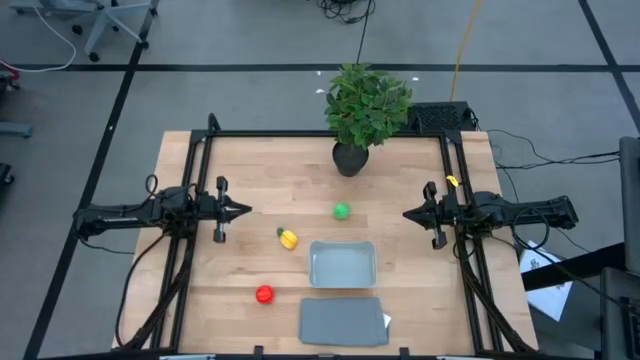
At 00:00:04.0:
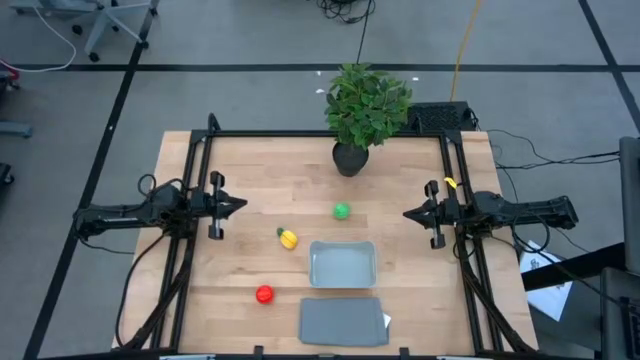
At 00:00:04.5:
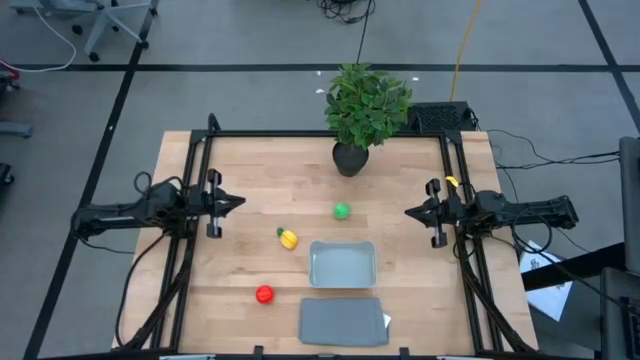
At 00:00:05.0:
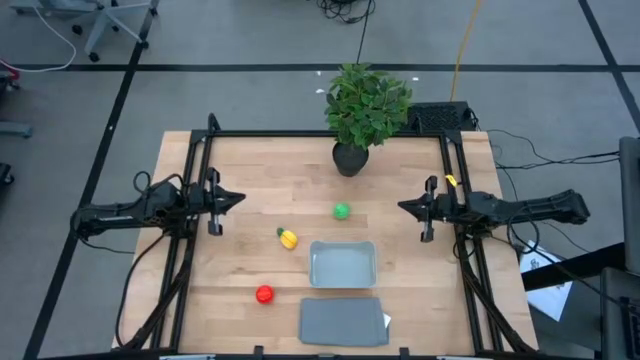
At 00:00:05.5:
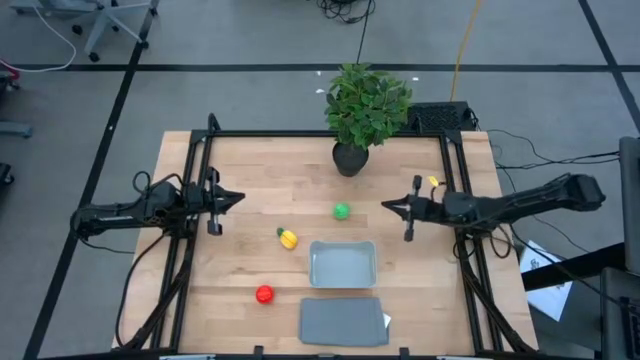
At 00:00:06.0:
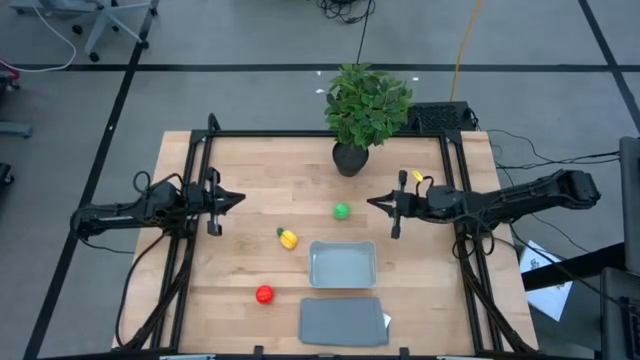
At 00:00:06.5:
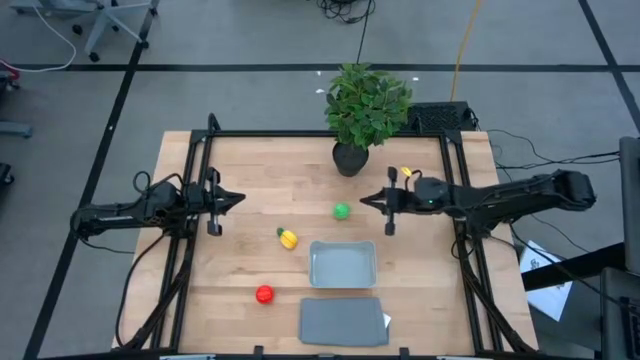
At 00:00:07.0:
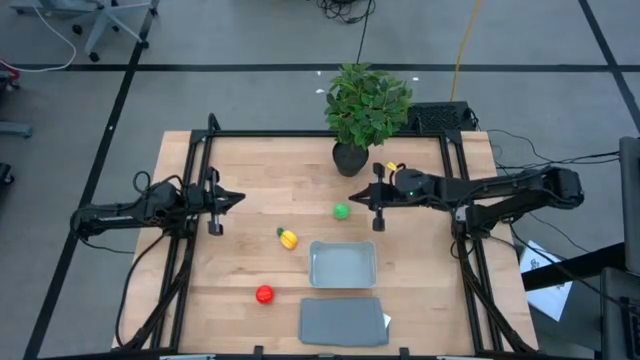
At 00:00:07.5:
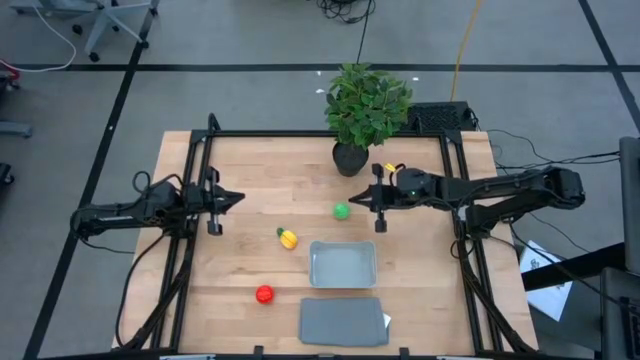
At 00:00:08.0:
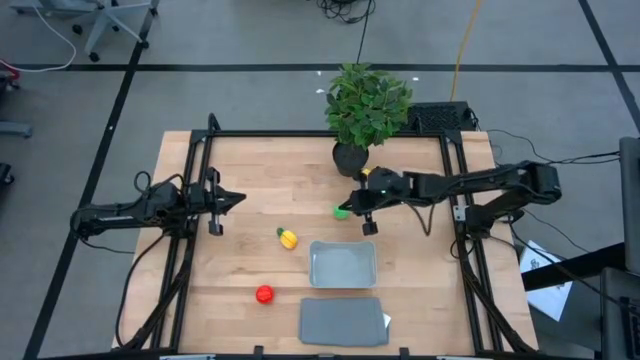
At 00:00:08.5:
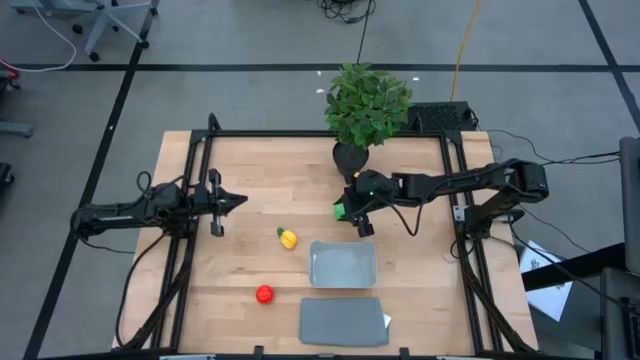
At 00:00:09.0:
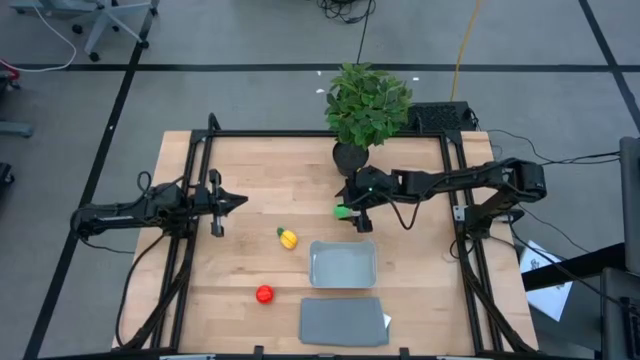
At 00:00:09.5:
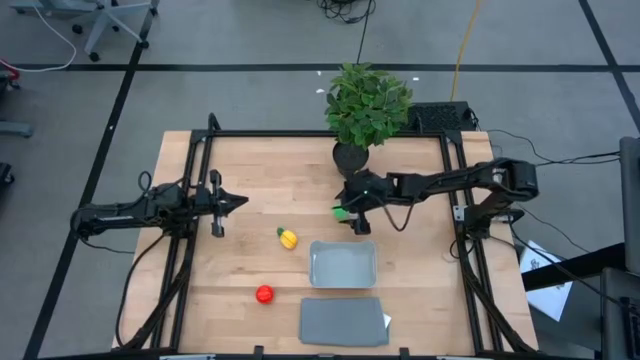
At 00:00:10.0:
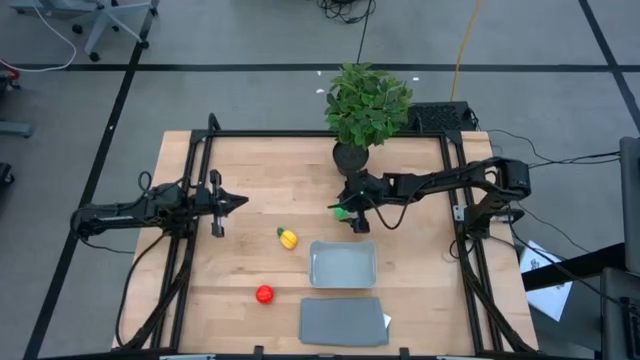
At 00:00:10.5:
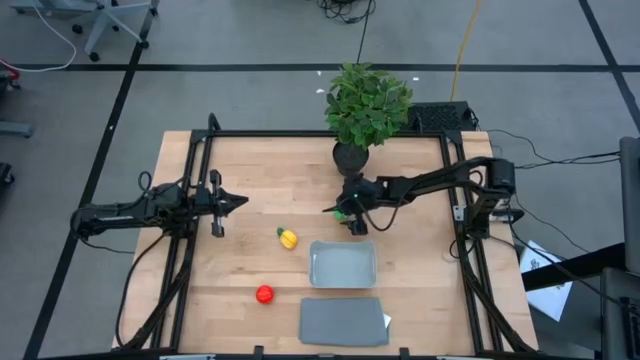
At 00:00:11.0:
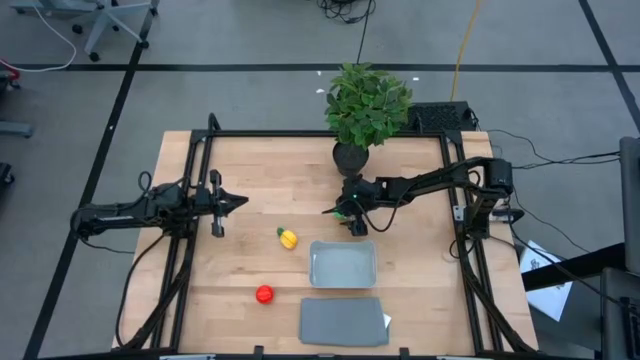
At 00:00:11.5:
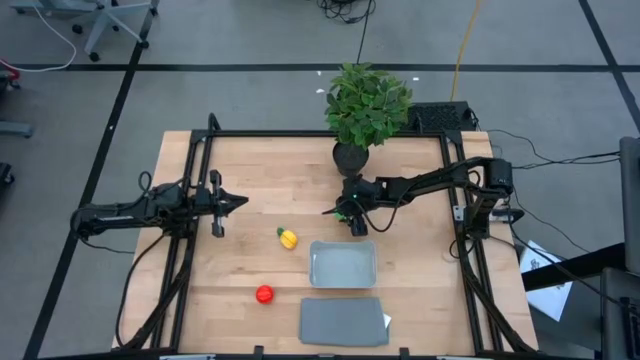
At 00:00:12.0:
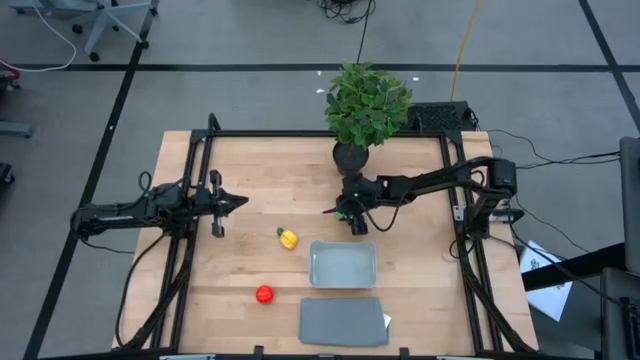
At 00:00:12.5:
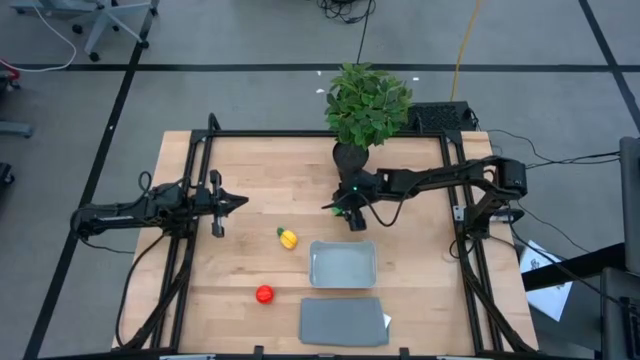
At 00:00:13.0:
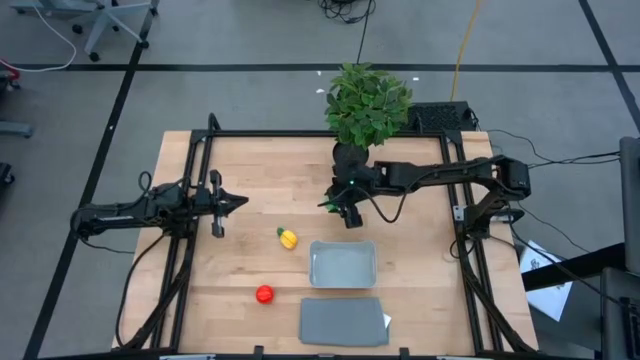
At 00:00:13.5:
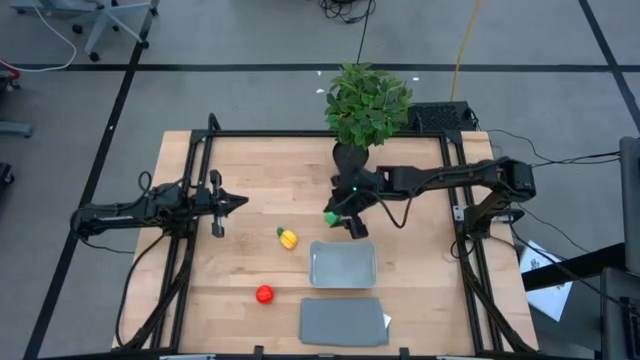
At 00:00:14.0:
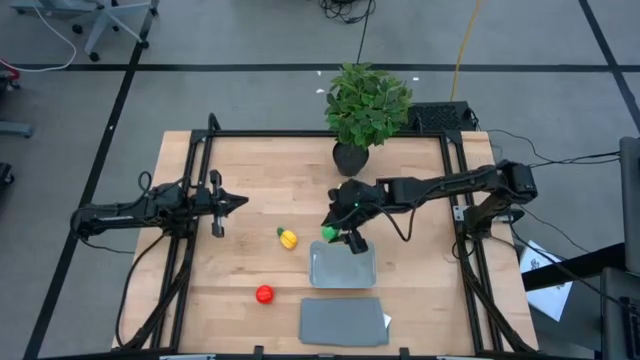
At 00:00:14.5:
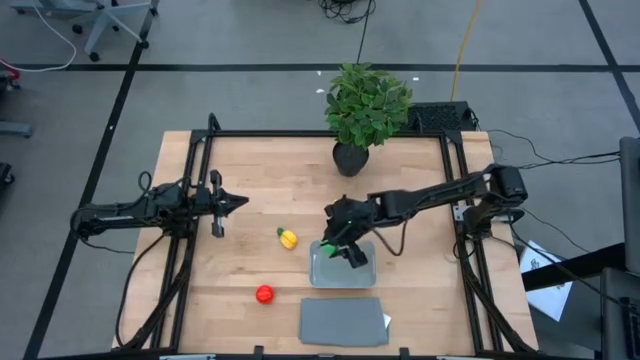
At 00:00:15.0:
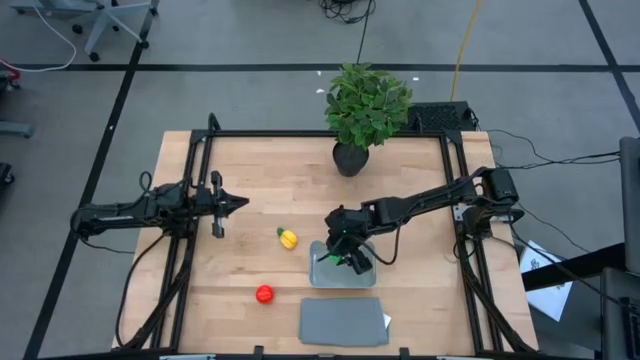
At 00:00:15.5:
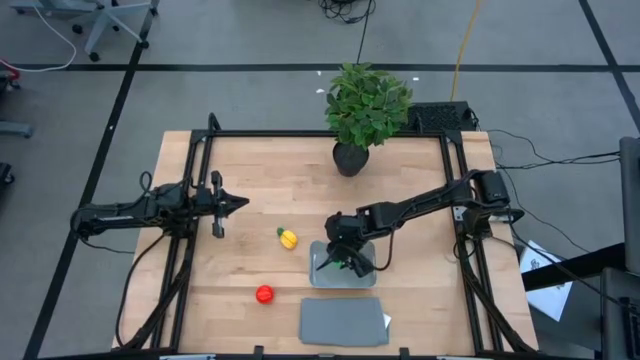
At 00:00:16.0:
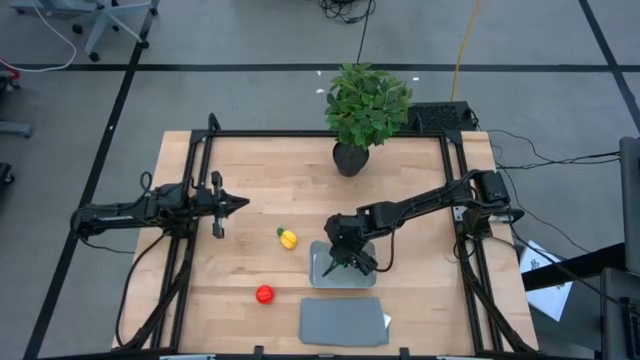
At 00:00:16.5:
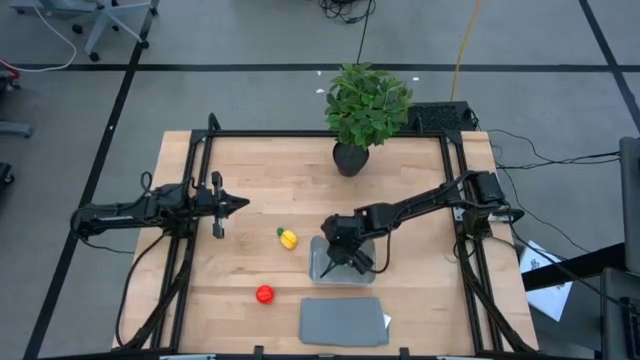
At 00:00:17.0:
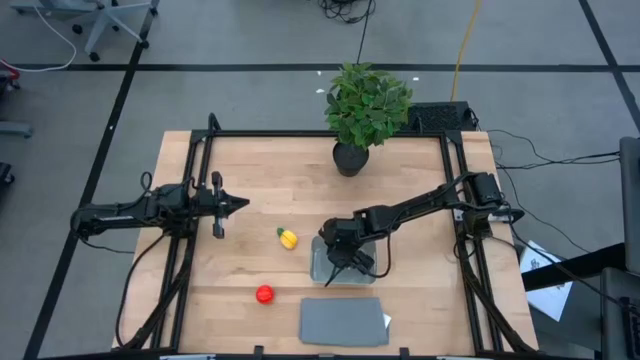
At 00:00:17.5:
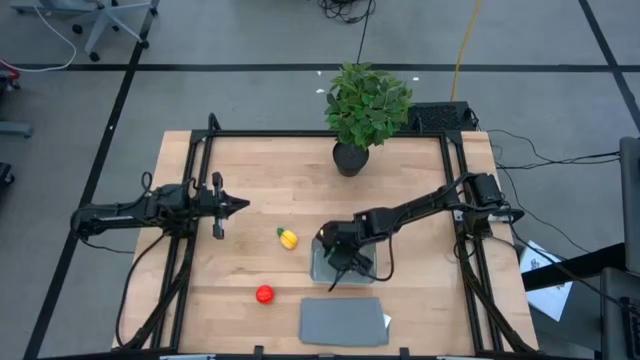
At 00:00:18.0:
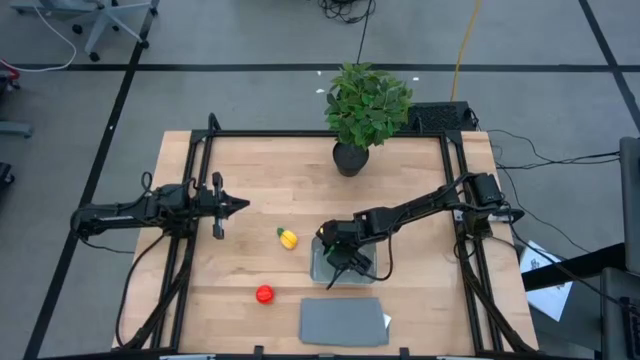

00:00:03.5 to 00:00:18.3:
Task: Pick and placing Produce into tupperware
Put the green pear into the bin

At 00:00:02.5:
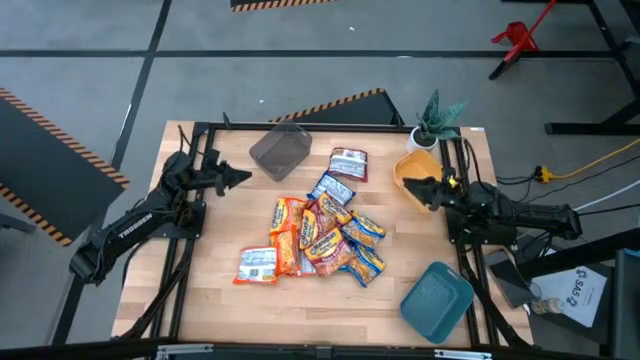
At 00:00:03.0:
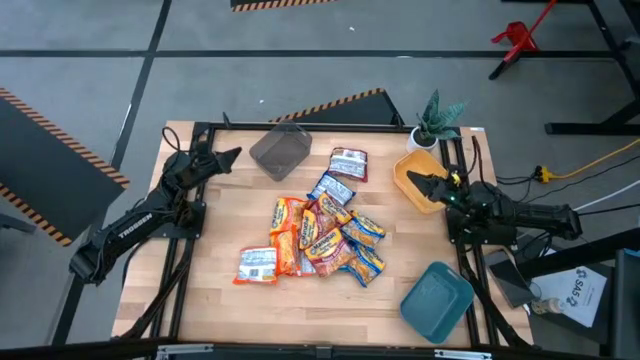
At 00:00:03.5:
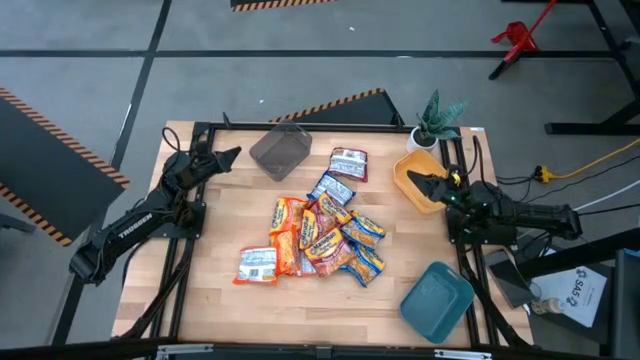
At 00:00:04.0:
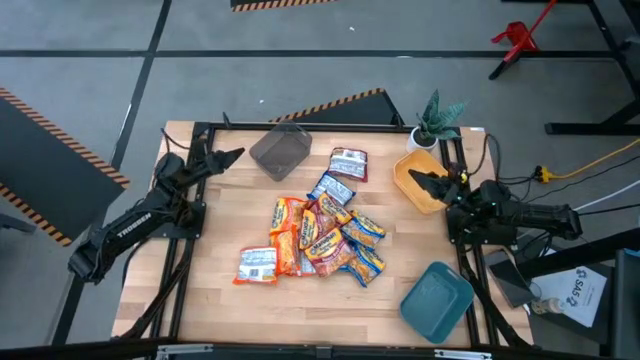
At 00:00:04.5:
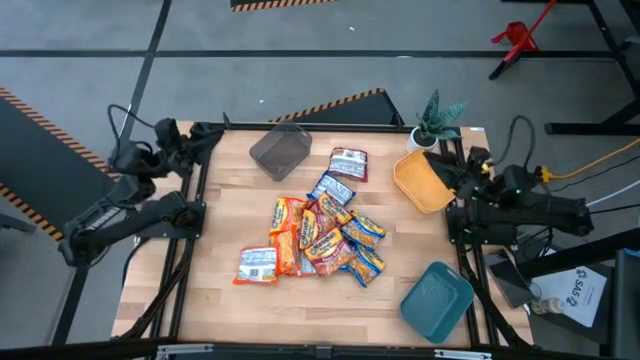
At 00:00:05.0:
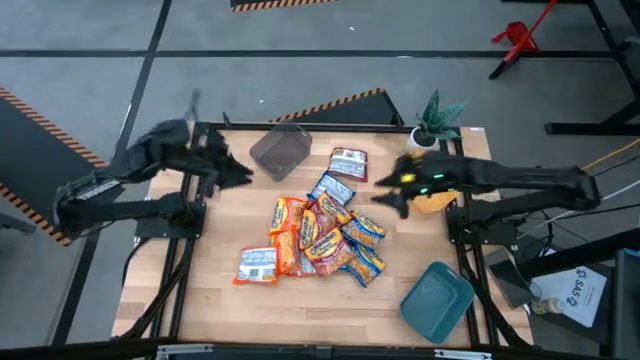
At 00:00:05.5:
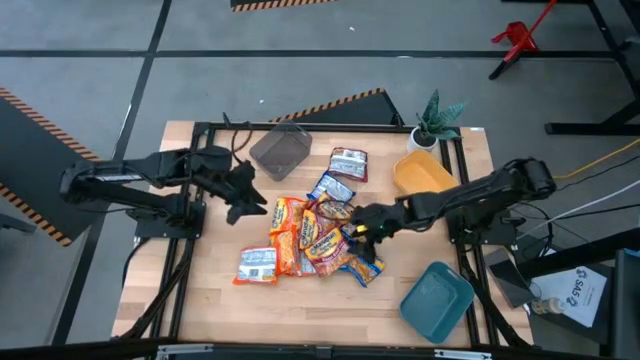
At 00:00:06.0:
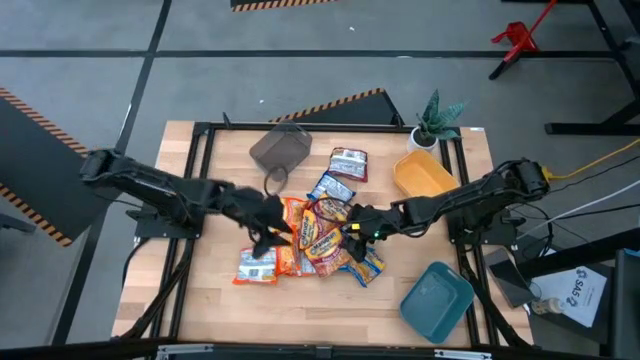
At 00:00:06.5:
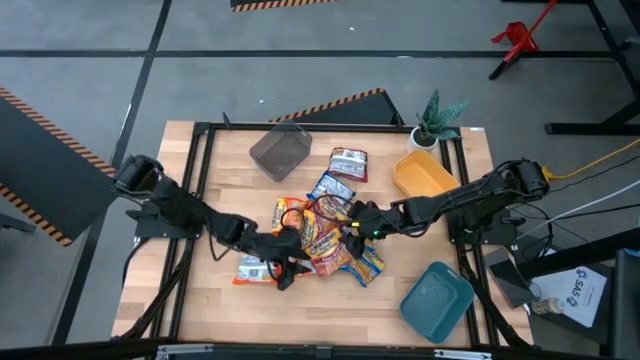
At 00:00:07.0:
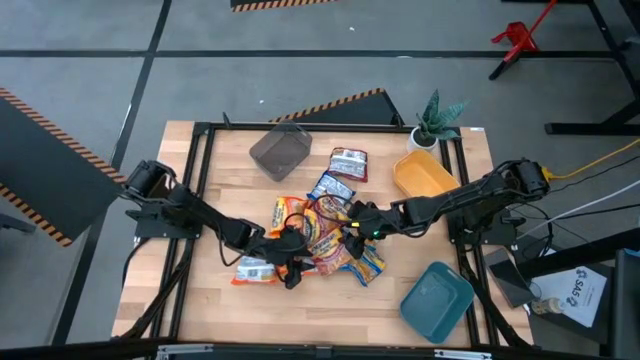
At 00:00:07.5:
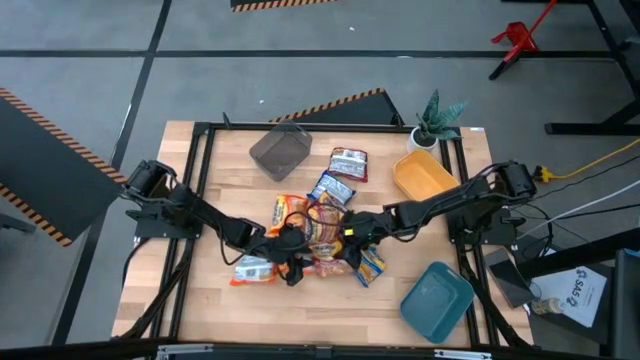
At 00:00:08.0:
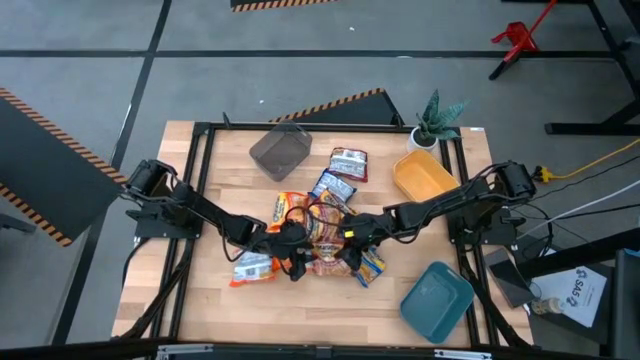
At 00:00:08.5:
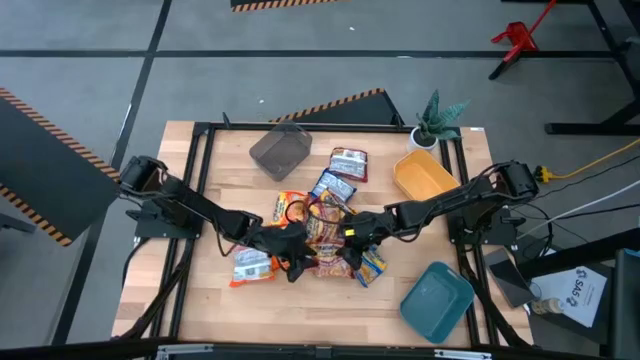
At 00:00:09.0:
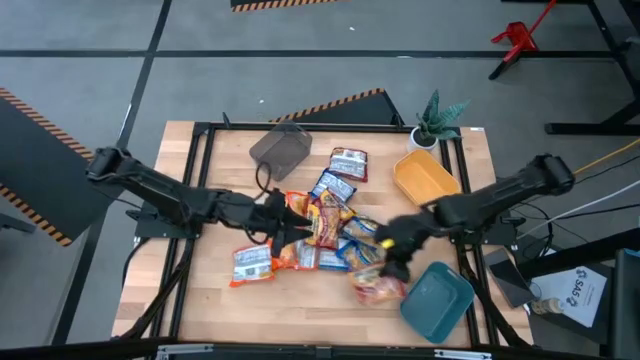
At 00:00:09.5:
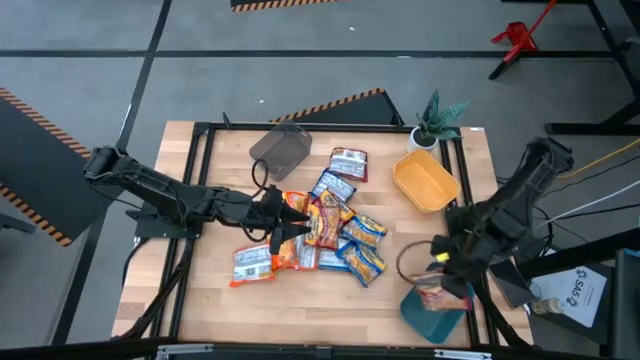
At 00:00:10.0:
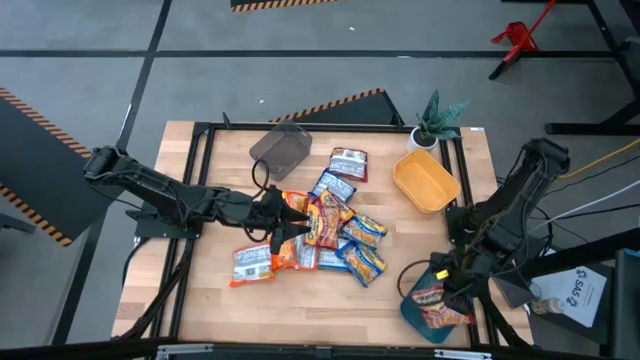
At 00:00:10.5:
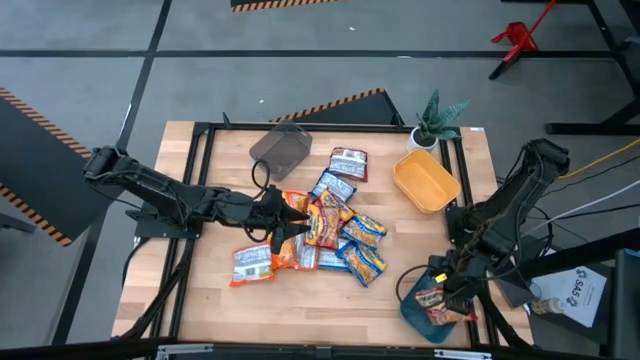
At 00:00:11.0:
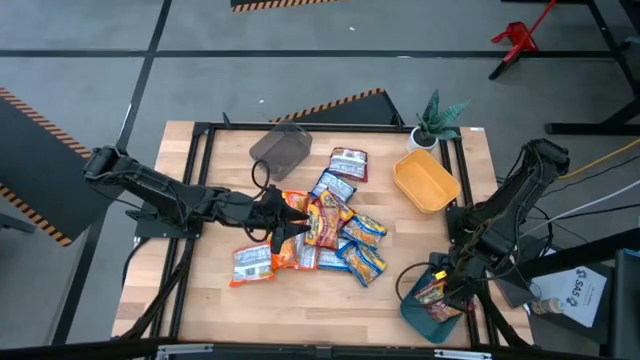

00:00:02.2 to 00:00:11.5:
Task: Sort Maruchan noodles
Put the red noodle pack into the blue bin
